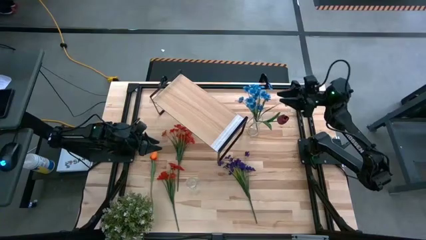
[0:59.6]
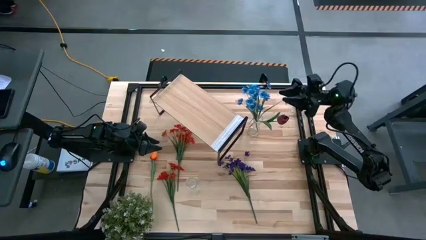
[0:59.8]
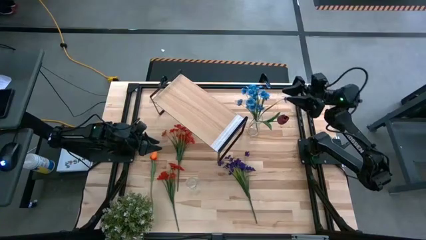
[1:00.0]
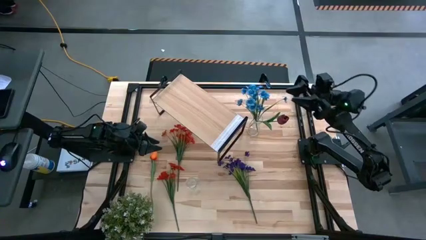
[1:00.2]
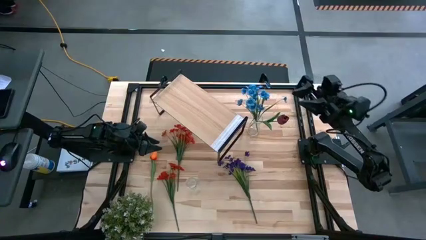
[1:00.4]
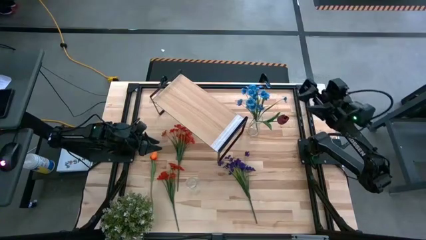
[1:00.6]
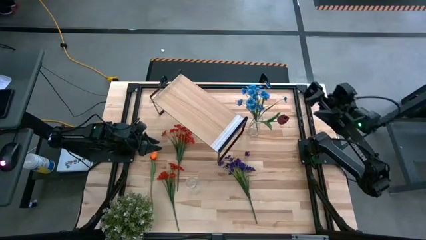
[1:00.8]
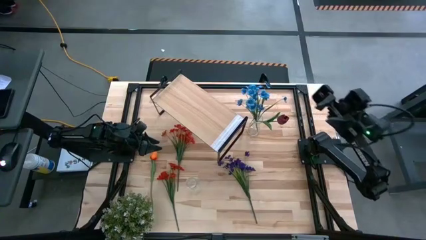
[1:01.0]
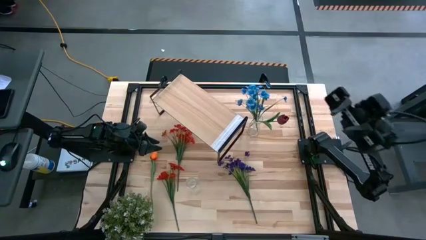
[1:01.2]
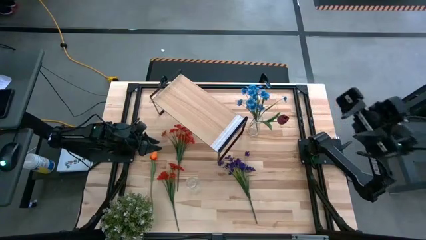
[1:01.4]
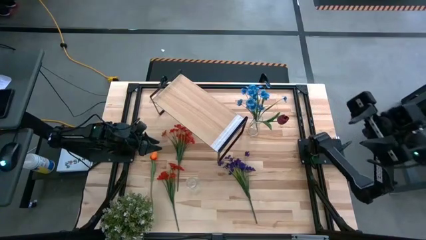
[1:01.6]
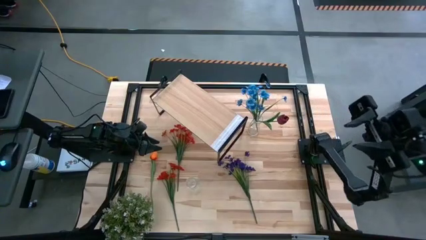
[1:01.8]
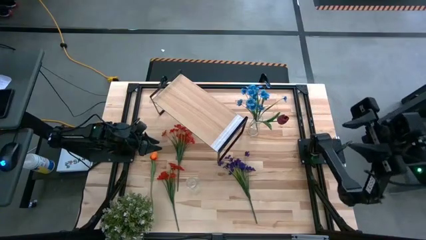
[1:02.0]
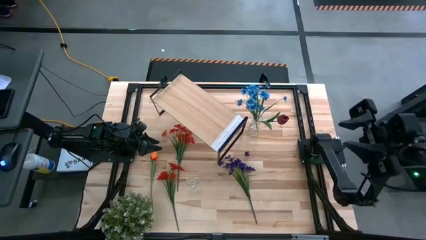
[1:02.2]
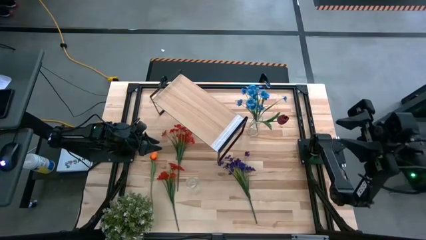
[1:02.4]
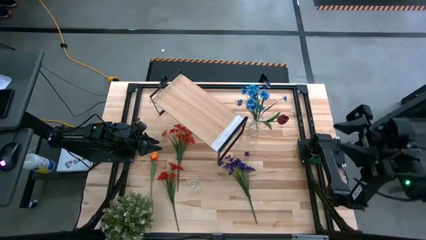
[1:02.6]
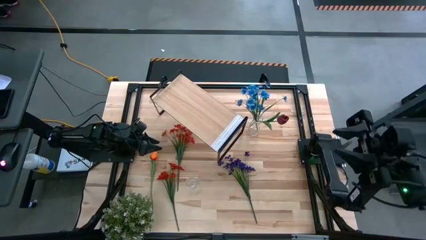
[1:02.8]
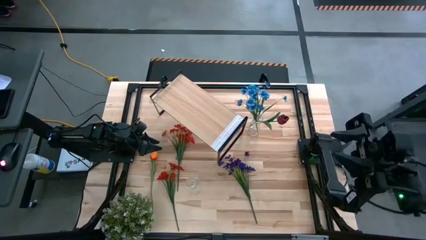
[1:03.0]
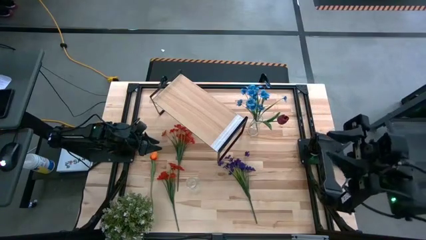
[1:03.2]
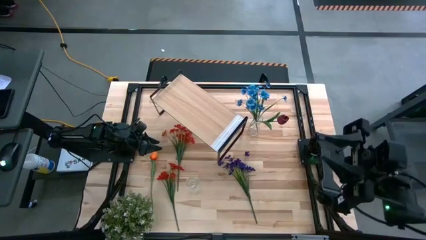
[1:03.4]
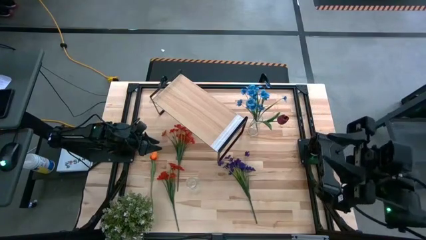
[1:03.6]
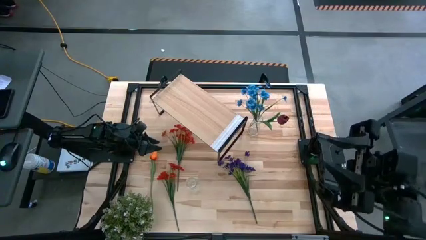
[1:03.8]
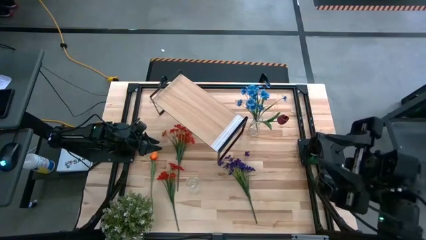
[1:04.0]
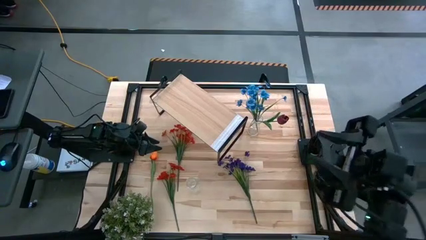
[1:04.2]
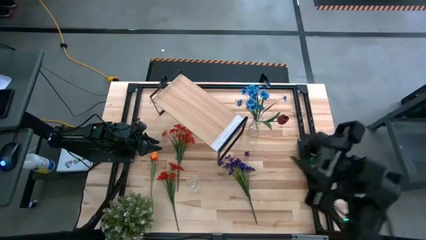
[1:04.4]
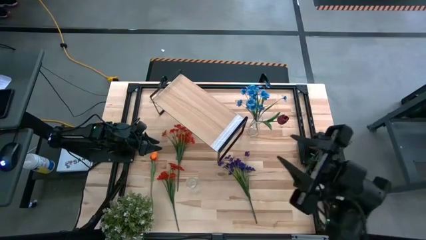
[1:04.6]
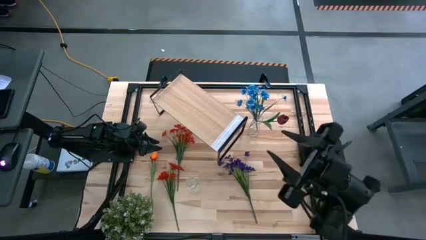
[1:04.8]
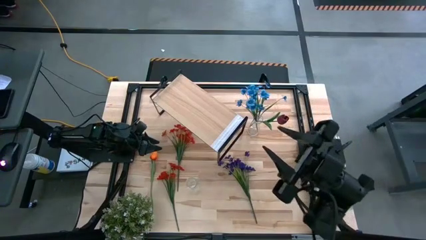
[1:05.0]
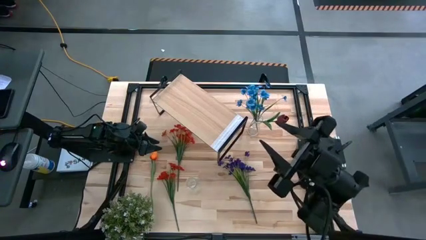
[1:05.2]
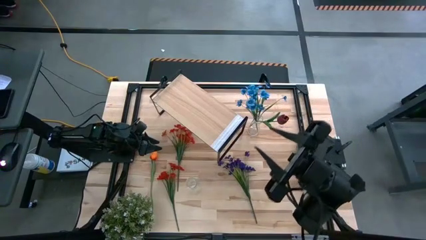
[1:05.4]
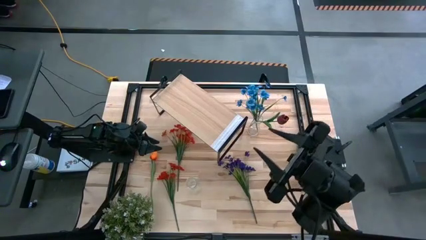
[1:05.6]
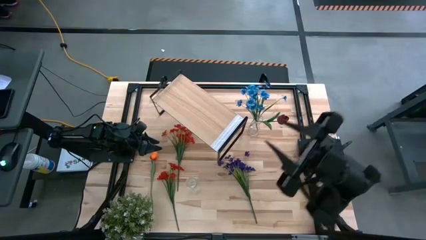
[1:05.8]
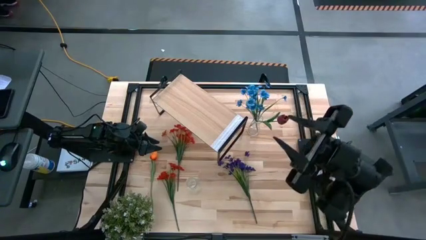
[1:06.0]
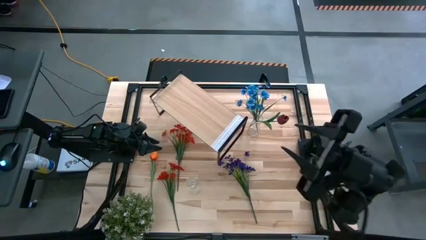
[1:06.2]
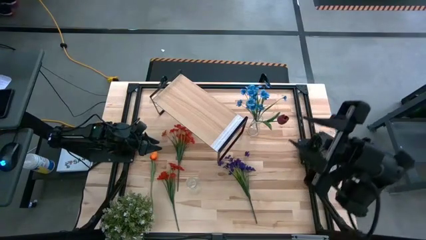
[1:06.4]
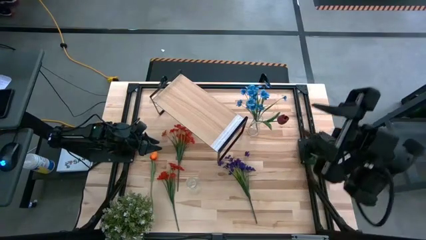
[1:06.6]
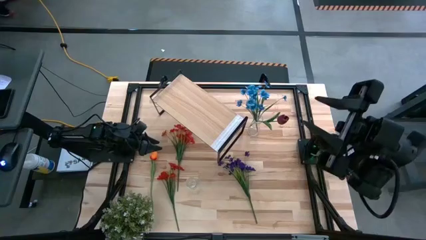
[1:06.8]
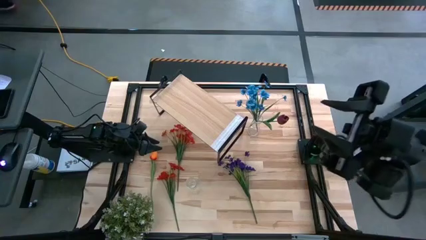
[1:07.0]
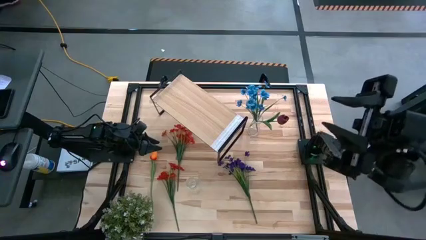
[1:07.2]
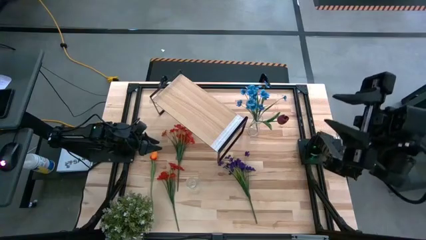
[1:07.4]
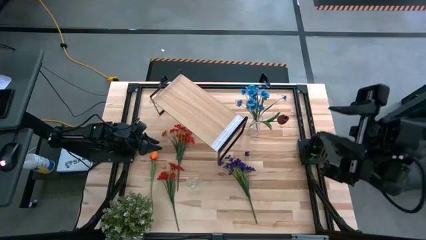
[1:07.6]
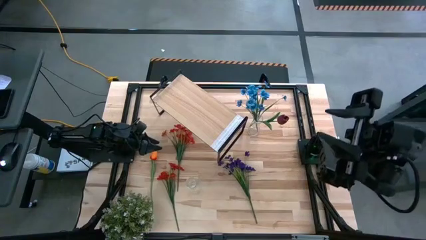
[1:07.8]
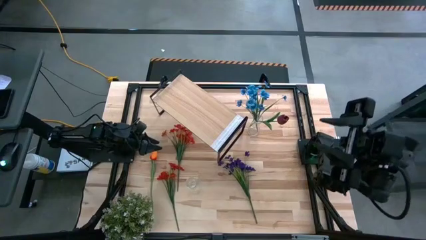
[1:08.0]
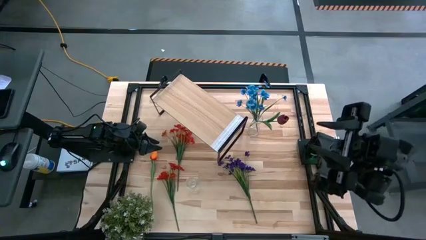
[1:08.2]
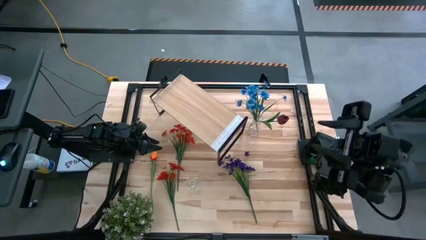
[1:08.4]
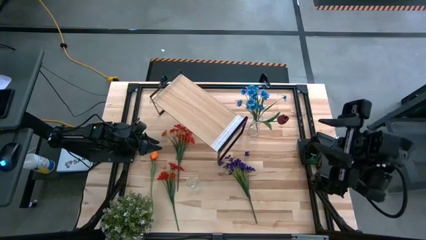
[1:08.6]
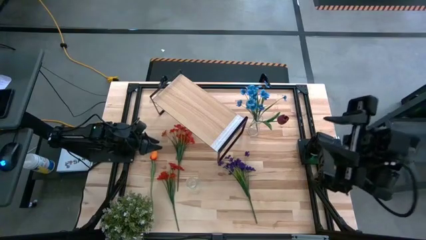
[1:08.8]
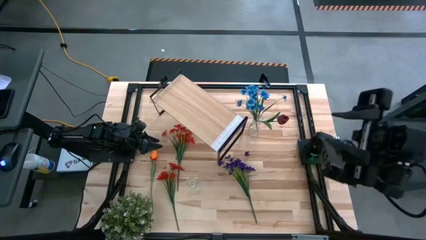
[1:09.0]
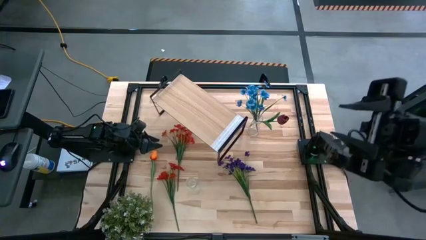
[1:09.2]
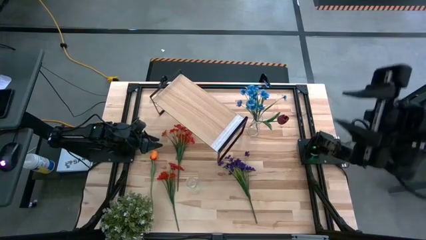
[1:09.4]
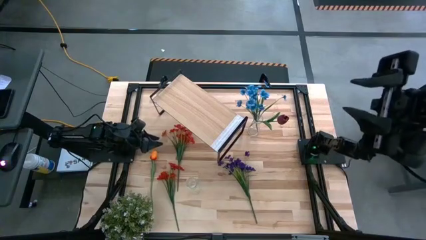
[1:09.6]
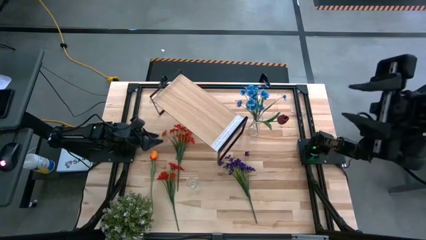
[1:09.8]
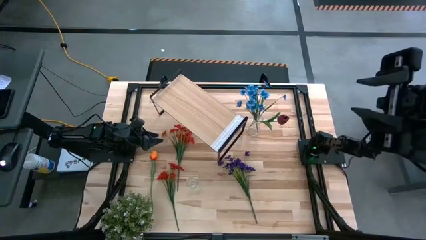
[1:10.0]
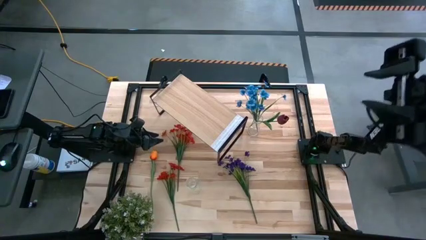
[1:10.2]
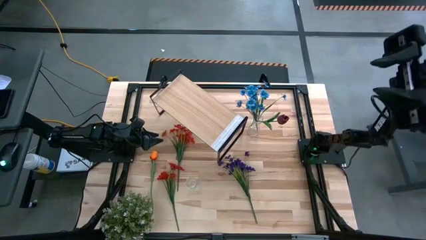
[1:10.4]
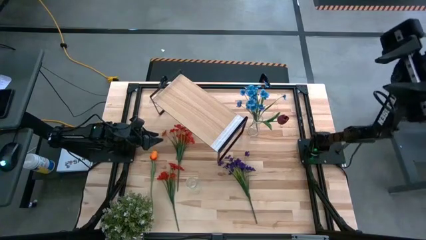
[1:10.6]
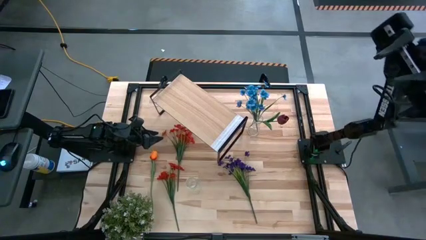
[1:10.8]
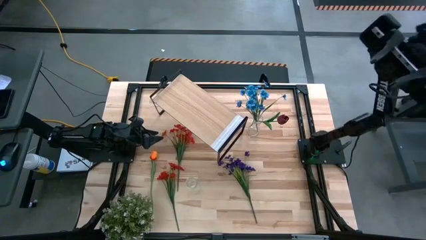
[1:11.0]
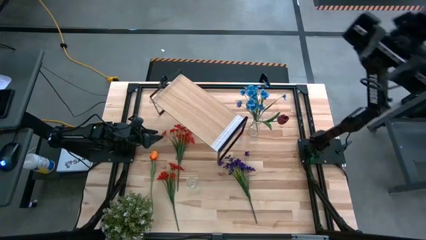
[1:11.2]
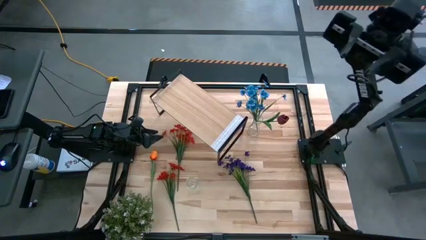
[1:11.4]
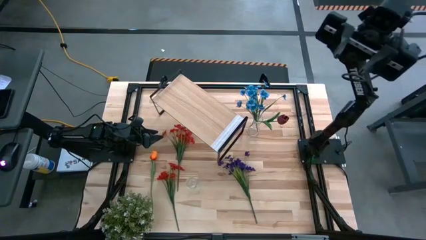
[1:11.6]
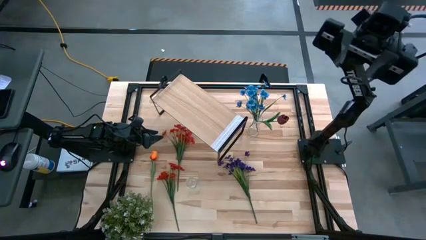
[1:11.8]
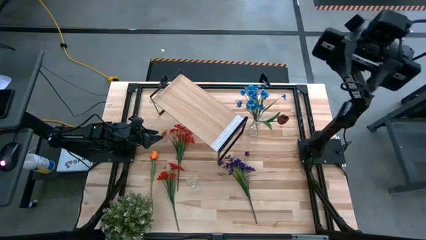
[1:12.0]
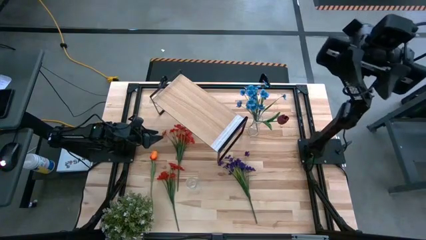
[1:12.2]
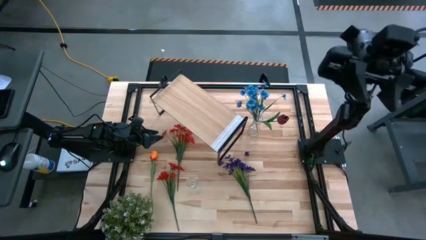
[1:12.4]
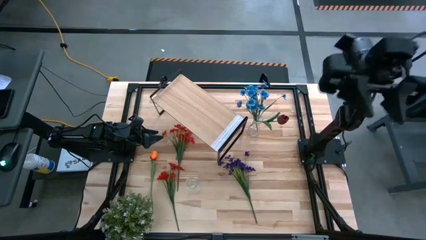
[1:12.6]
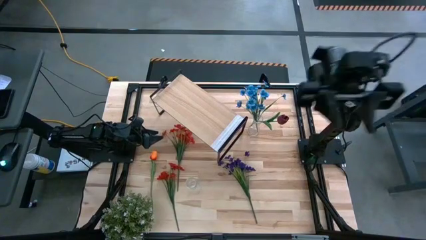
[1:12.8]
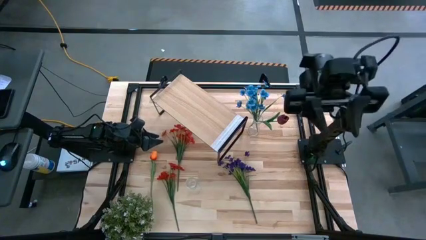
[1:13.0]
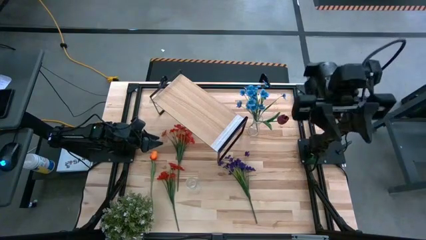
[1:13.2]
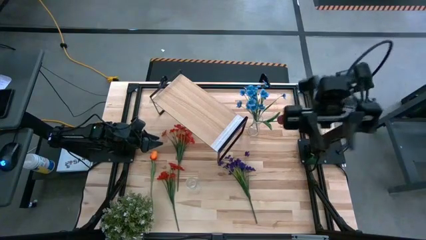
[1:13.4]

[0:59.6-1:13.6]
Task: Pick and place flowers into a vace then onto a shelf
Put the violet flowers into the top transparent vase
